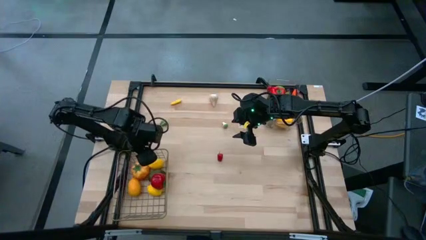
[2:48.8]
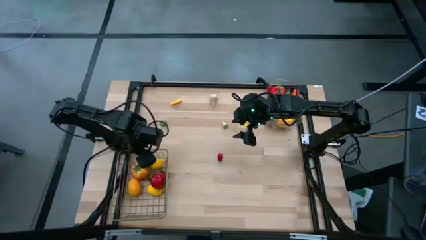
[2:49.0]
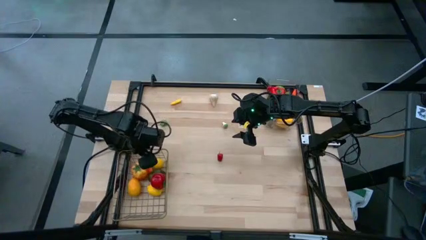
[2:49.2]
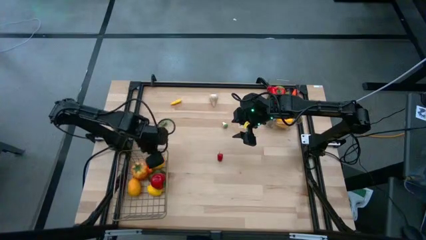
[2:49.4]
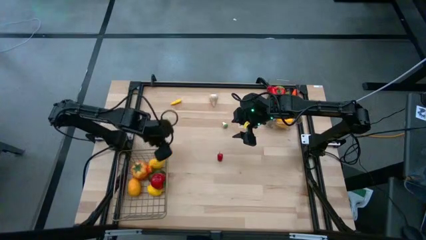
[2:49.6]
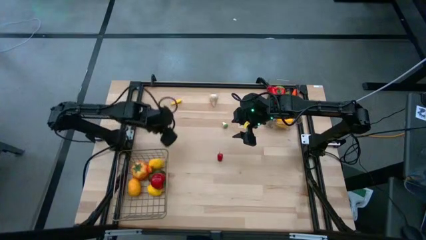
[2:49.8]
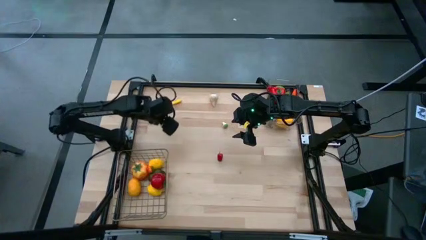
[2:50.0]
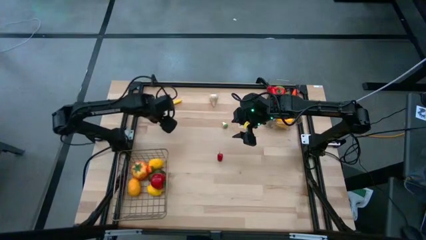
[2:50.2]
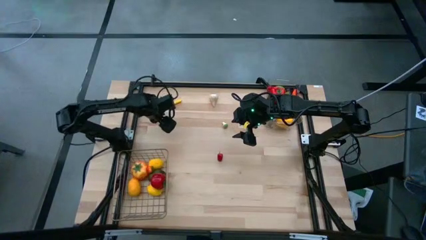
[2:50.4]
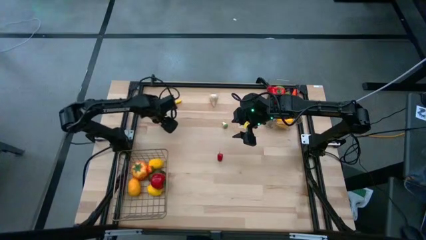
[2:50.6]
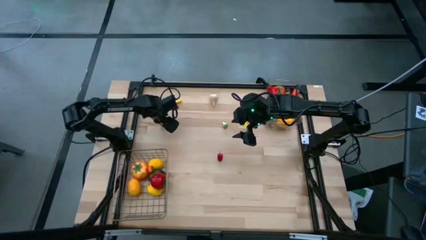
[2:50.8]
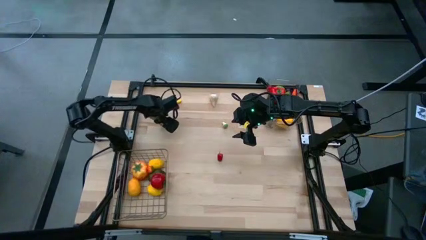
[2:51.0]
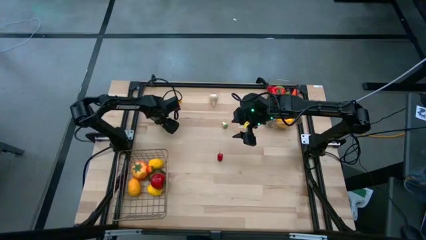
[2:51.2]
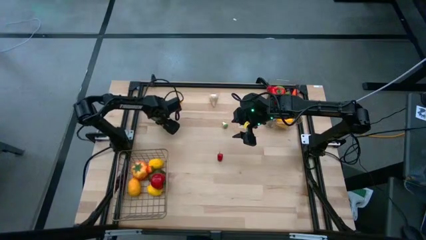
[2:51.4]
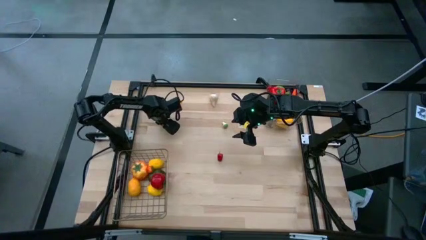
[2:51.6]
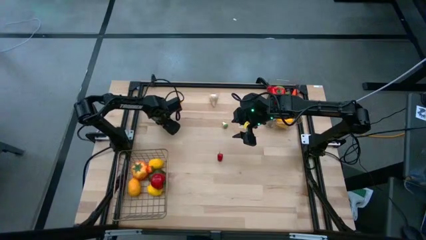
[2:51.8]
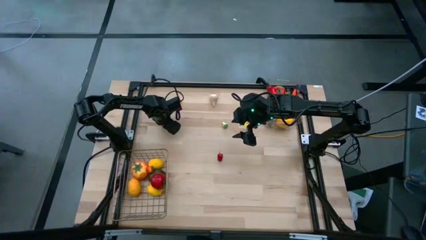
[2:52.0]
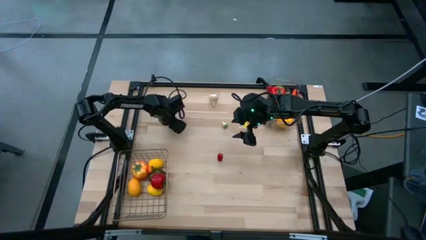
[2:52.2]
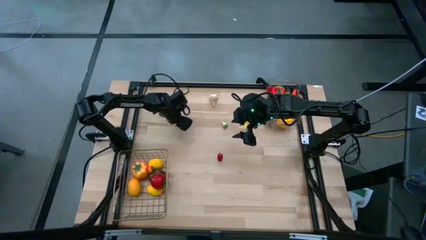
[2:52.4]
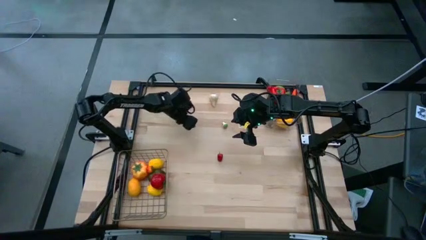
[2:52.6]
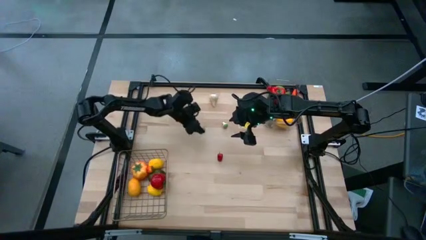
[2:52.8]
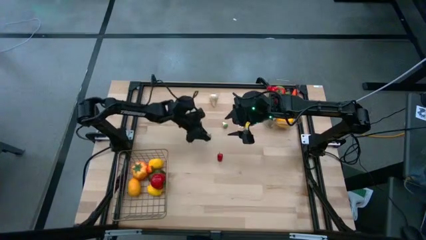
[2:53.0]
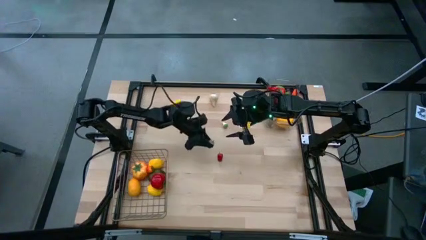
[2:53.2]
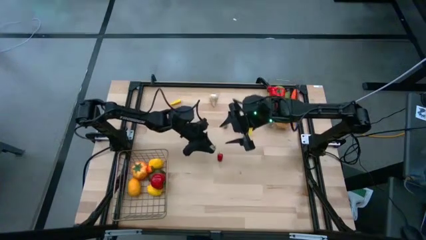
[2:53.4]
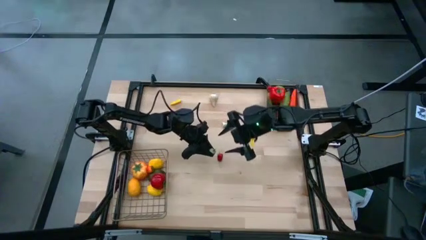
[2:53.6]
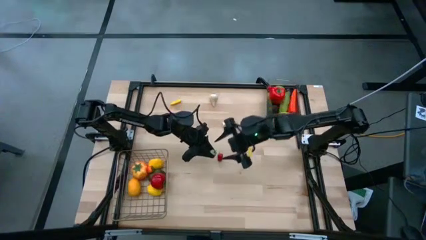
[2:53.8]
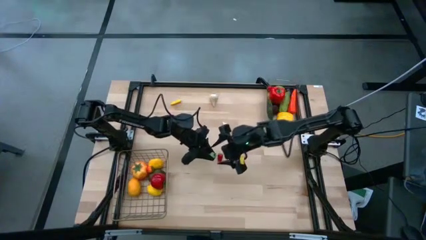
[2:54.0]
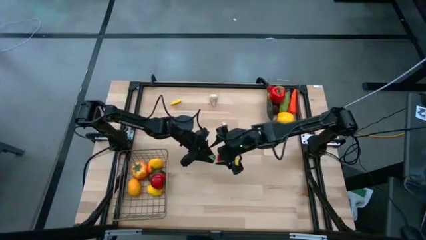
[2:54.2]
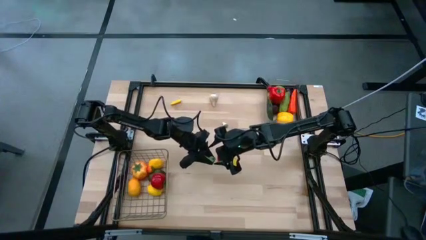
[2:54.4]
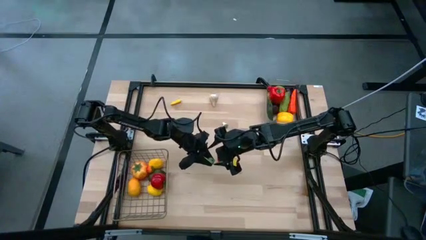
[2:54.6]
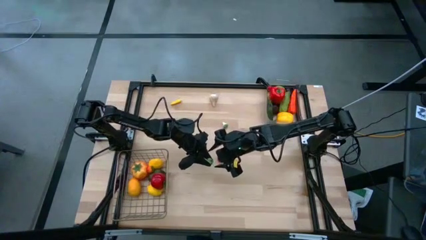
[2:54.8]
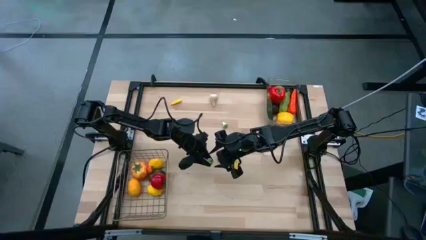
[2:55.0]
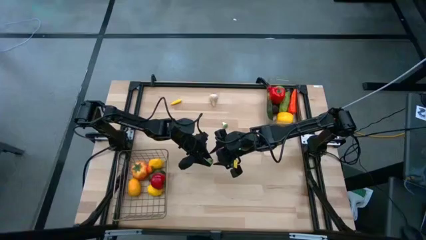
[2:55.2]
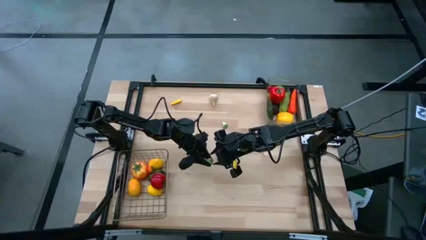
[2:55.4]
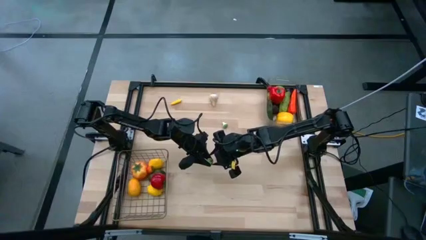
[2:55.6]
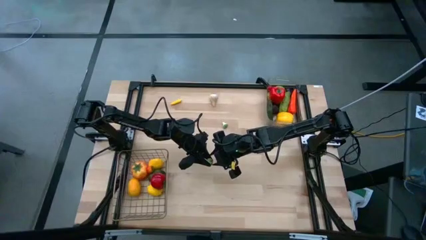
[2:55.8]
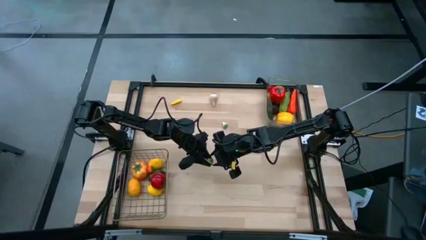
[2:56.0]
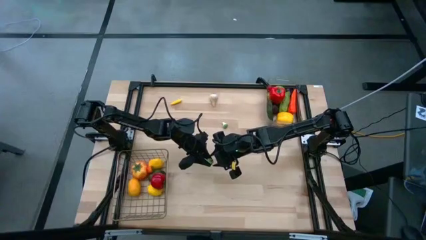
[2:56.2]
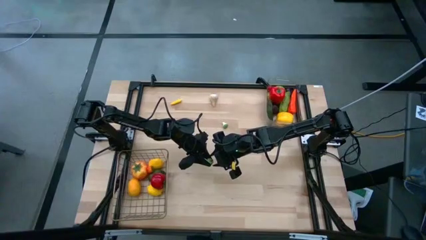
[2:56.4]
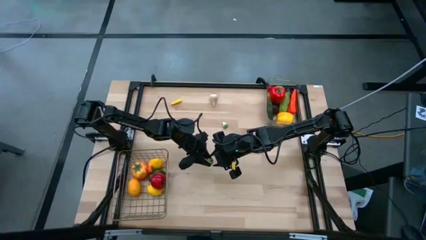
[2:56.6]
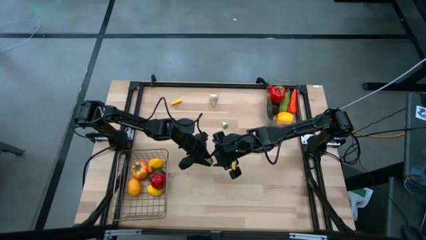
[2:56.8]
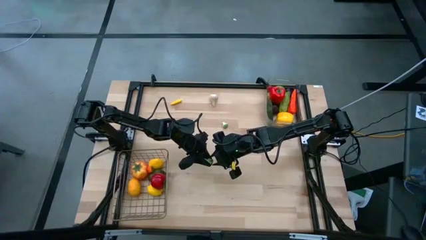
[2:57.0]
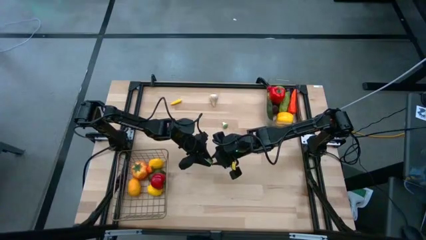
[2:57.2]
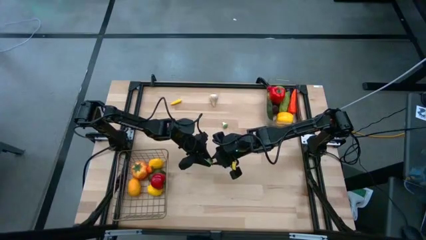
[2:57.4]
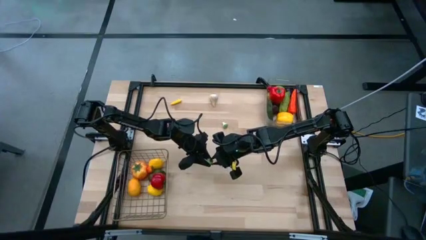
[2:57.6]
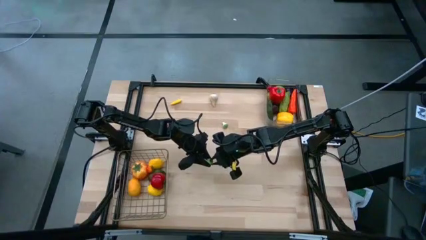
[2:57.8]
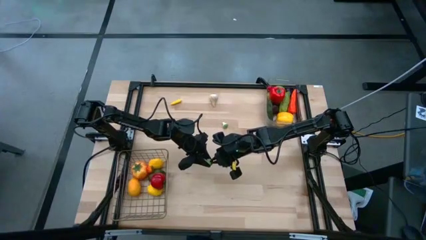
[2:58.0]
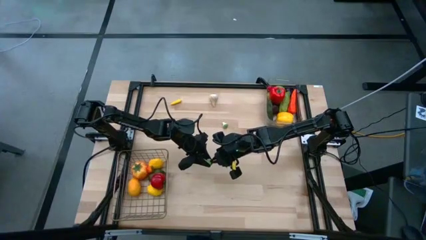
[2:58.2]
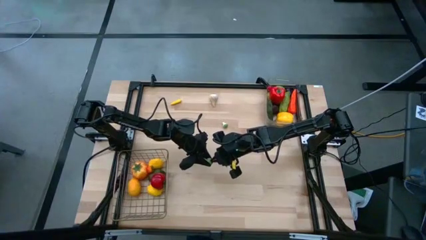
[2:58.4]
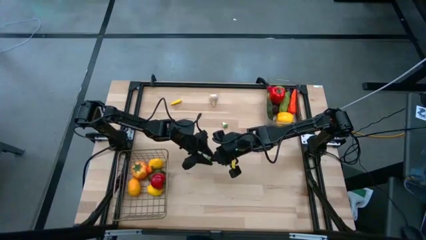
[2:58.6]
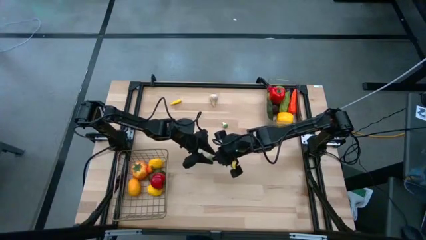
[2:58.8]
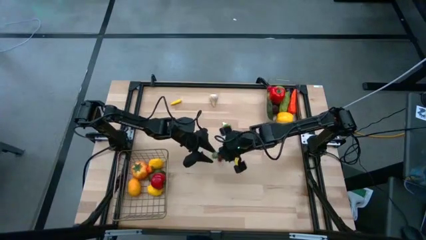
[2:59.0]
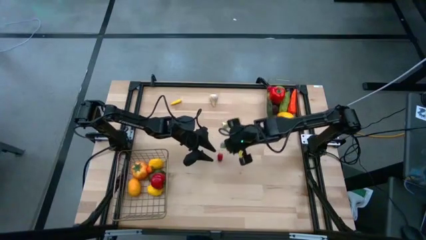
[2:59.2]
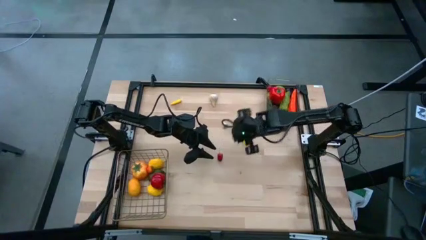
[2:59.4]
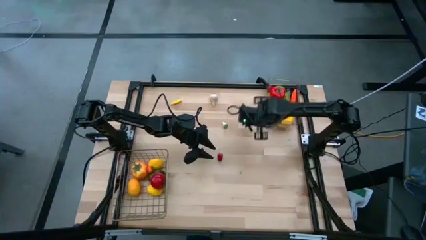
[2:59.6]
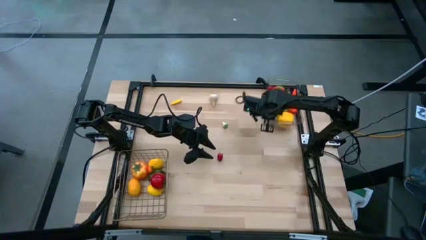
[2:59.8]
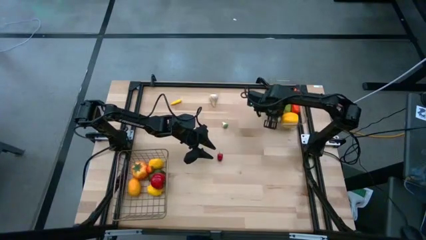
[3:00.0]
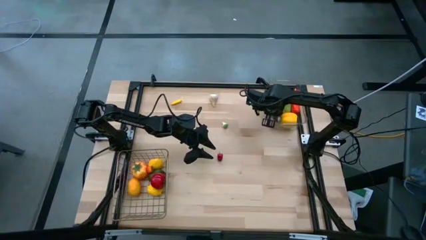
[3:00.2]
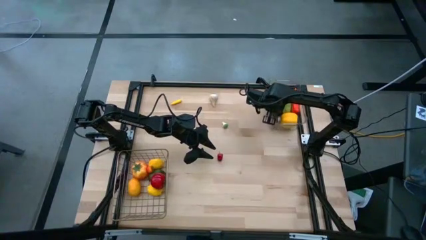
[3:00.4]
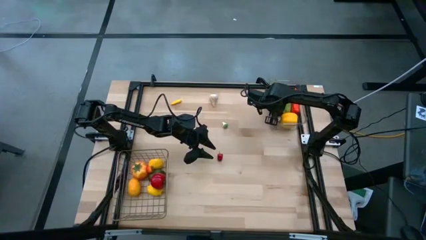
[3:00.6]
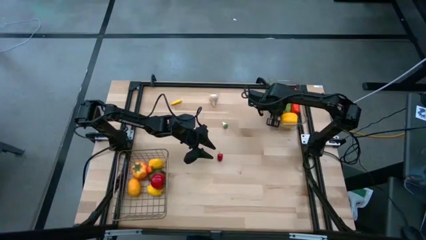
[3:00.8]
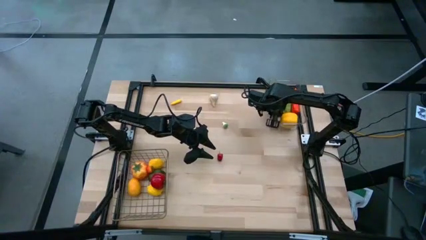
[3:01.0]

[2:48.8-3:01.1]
Task: Sort produce into baskets
Put the green chili pepper into the transparent bin

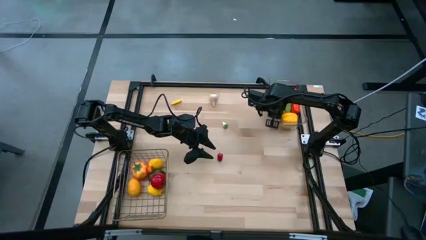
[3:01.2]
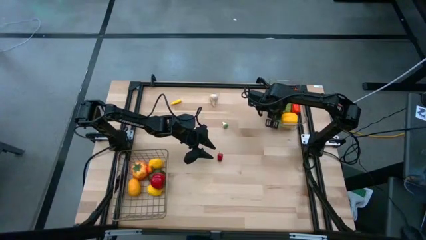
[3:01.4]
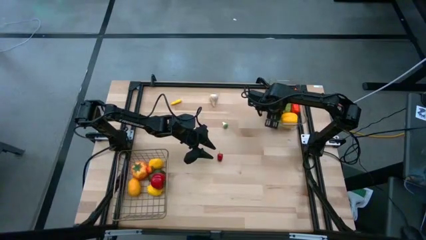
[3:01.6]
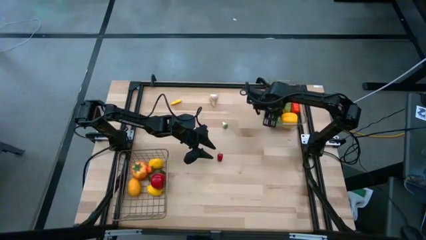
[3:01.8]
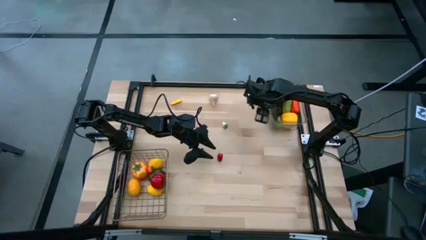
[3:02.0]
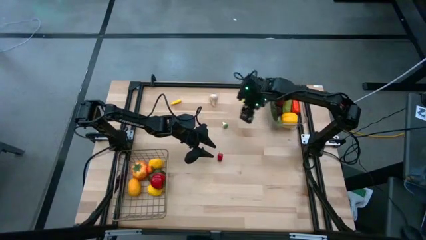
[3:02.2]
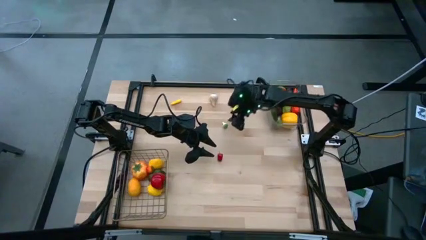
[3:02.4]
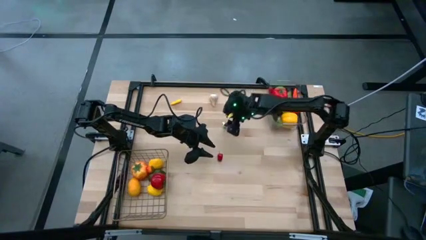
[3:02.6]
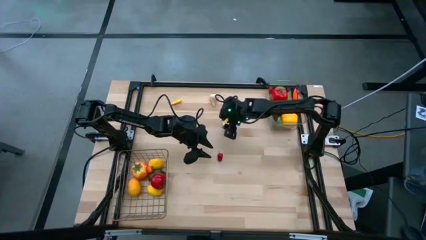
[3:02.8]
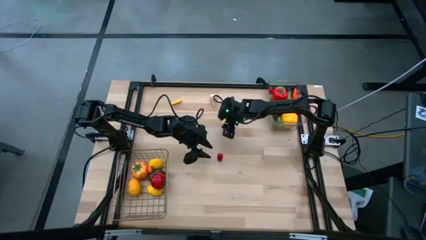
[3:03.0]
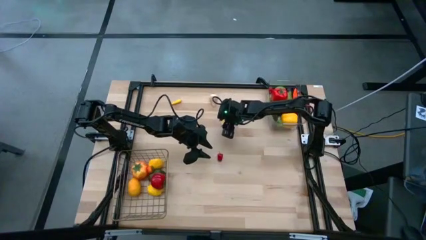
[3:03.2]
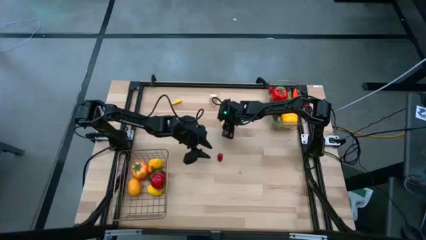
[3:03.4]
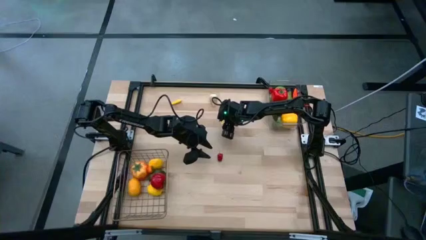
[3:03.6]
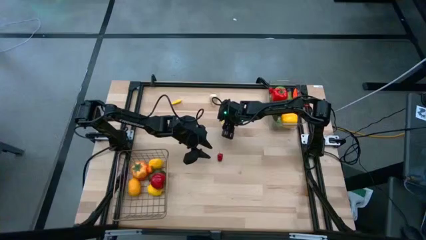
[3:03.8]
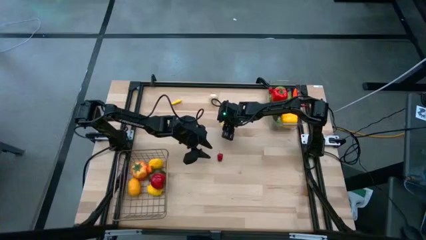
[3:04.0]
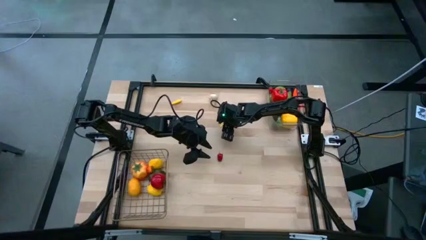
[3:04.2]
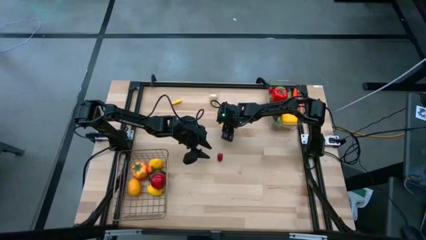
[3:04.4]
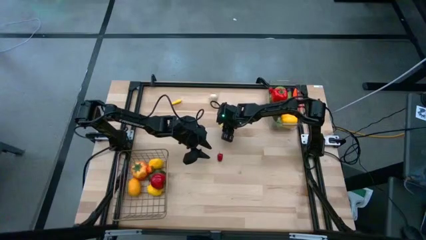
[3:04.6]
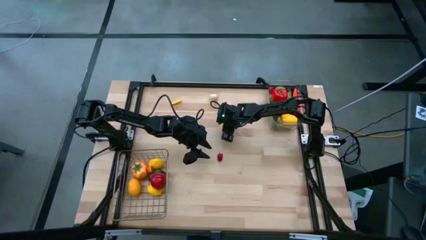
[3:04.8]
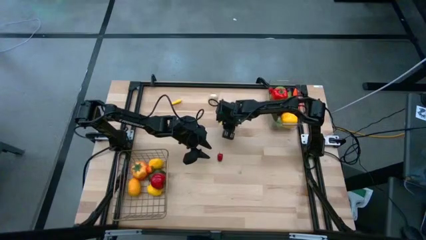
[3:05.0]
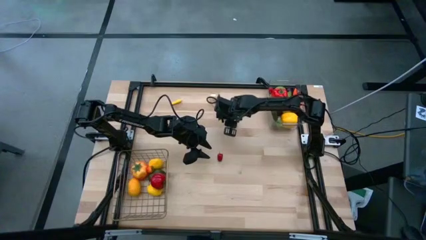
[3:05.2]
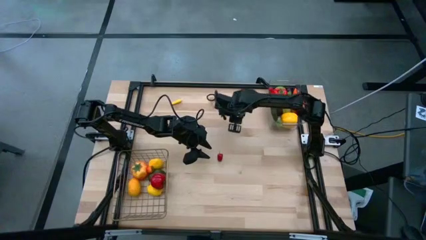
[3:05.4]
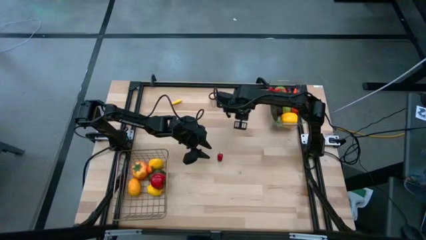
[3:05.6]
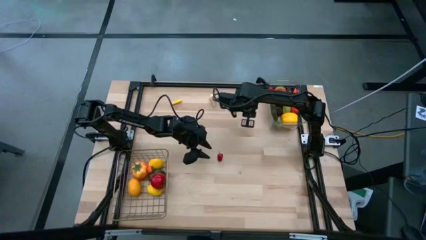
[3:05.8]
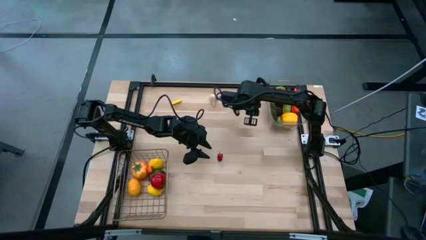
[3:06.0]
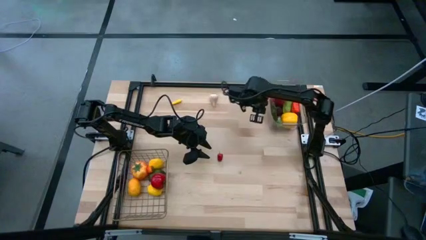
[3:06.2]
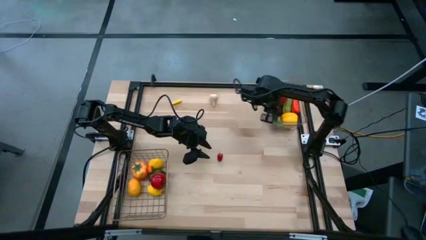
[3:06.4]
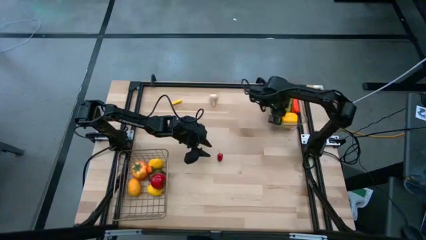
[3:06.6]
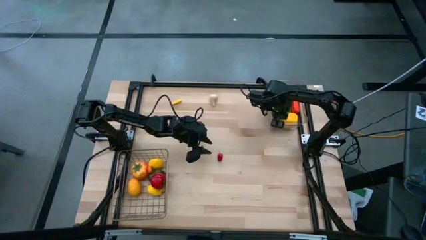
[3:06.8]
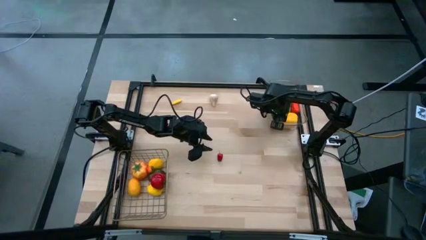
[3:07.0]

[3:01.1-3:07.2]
Put the green mushroom into the transparent bin
